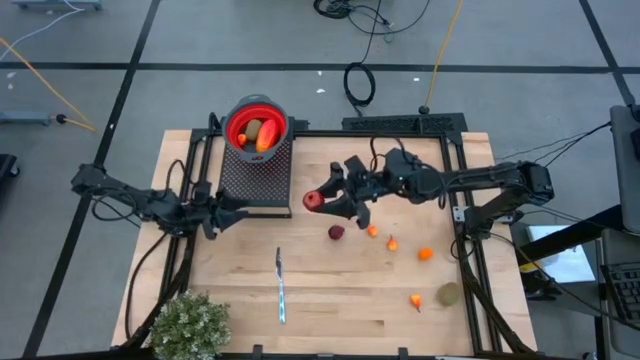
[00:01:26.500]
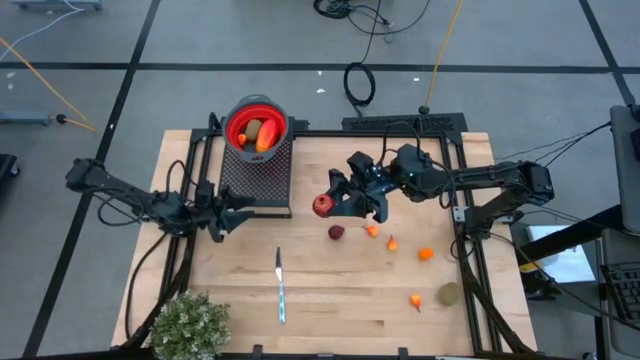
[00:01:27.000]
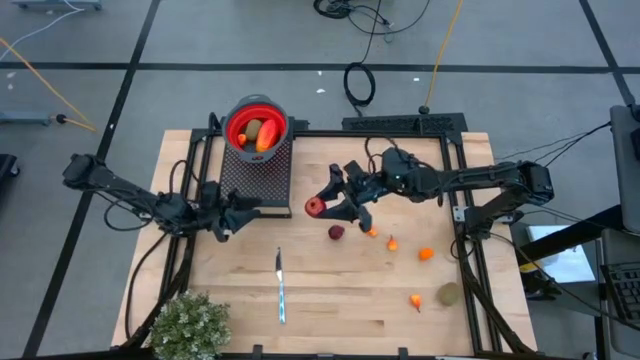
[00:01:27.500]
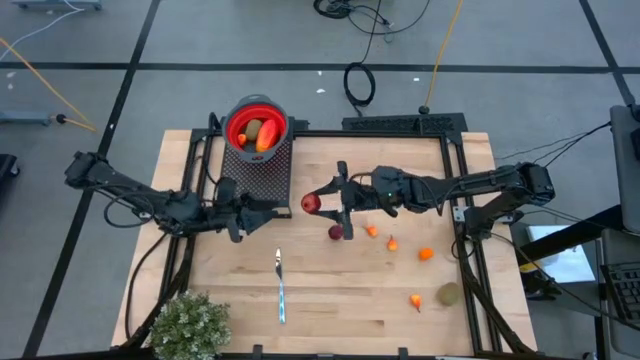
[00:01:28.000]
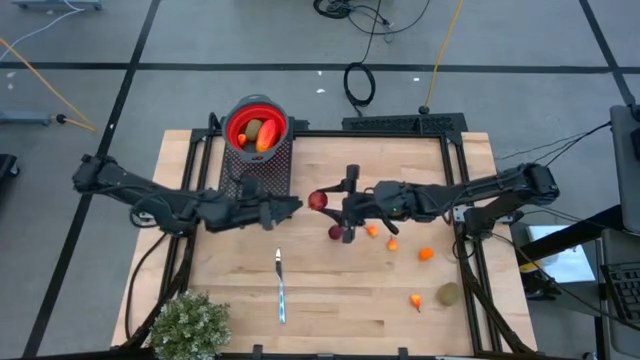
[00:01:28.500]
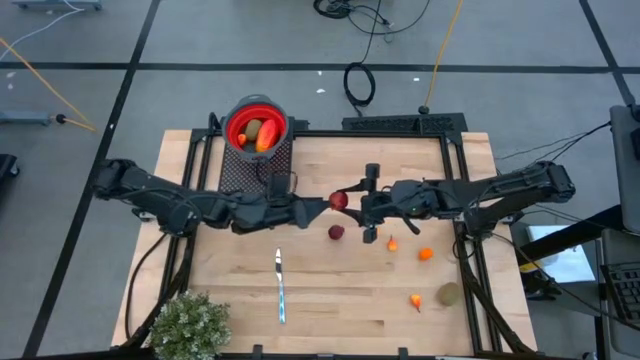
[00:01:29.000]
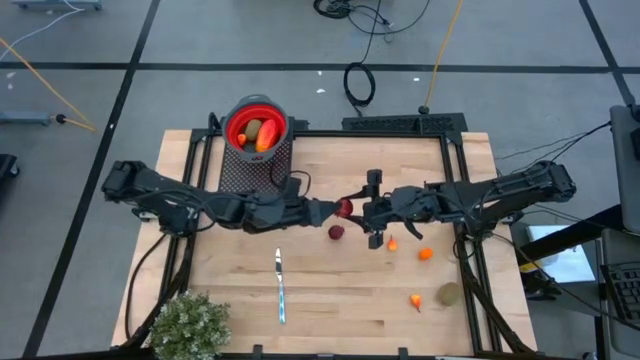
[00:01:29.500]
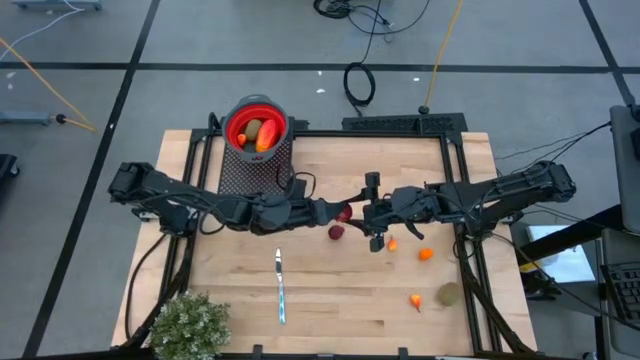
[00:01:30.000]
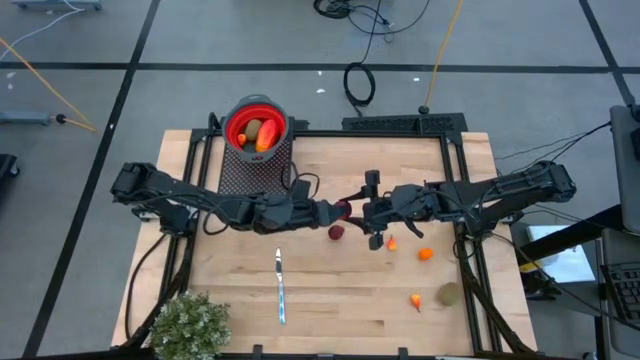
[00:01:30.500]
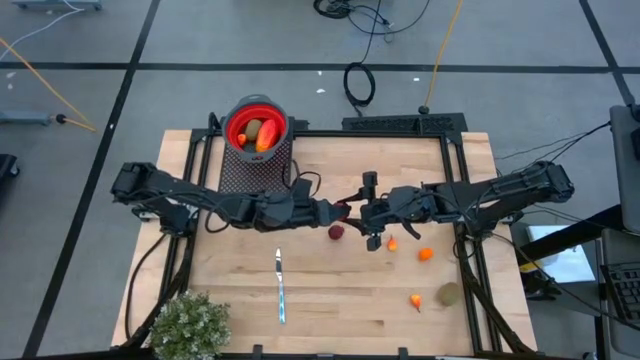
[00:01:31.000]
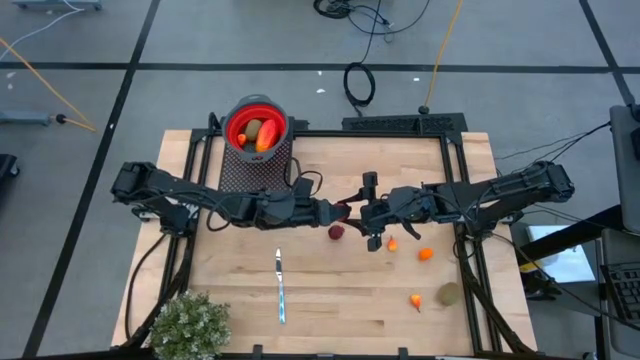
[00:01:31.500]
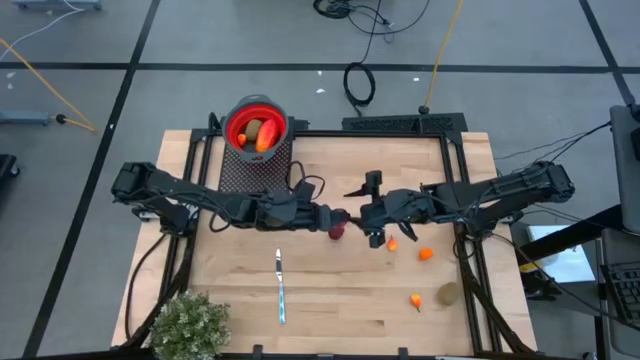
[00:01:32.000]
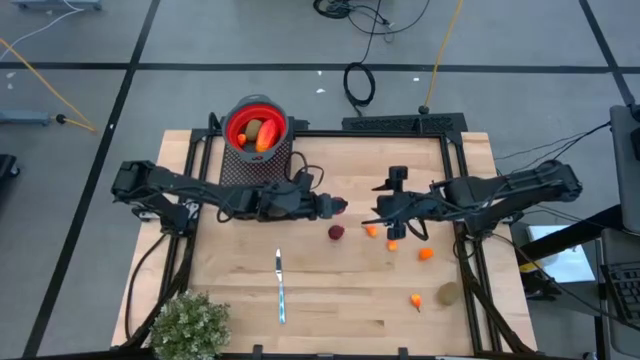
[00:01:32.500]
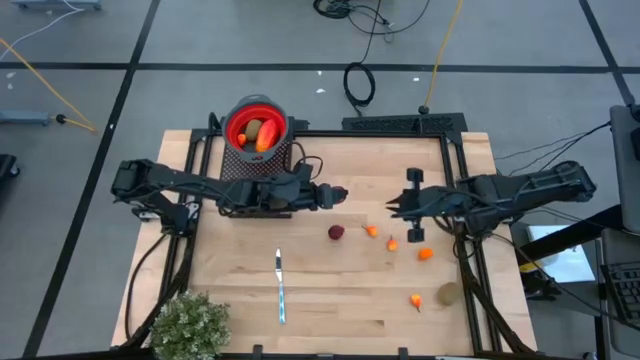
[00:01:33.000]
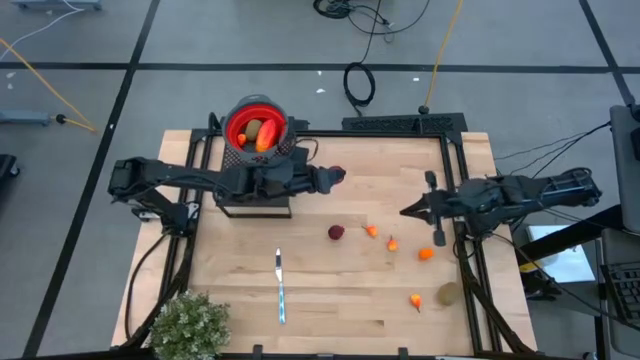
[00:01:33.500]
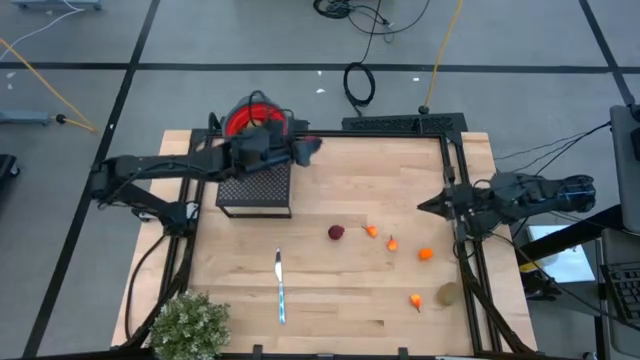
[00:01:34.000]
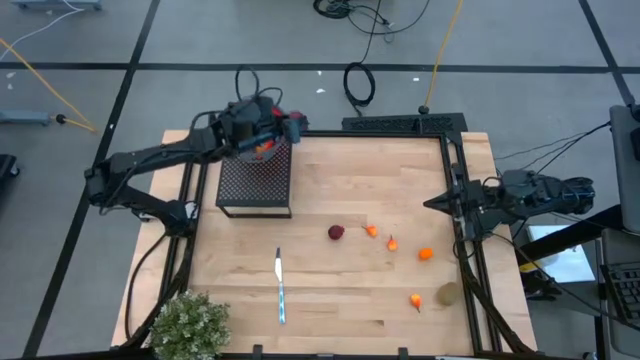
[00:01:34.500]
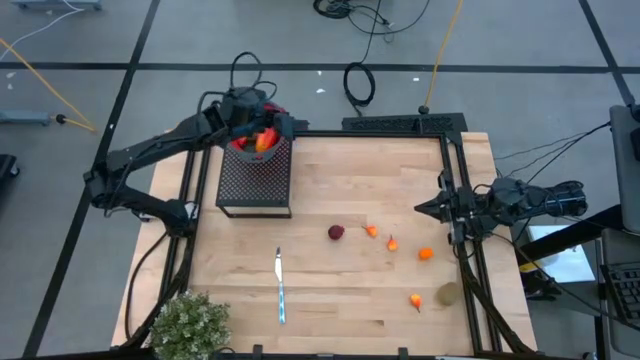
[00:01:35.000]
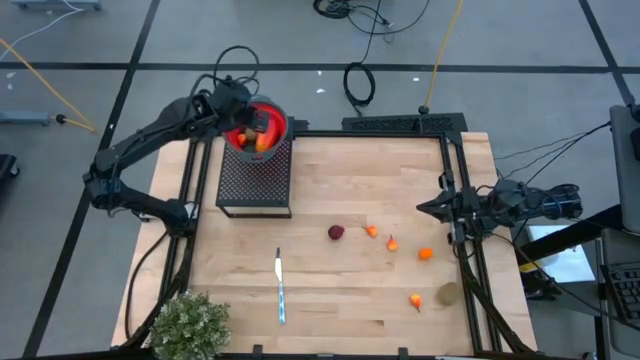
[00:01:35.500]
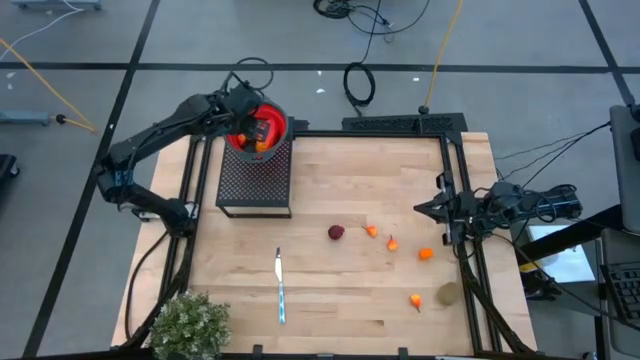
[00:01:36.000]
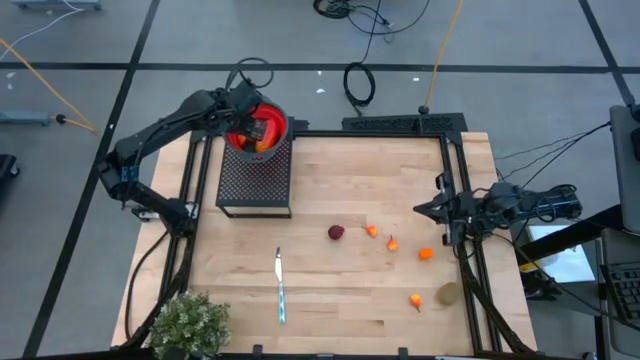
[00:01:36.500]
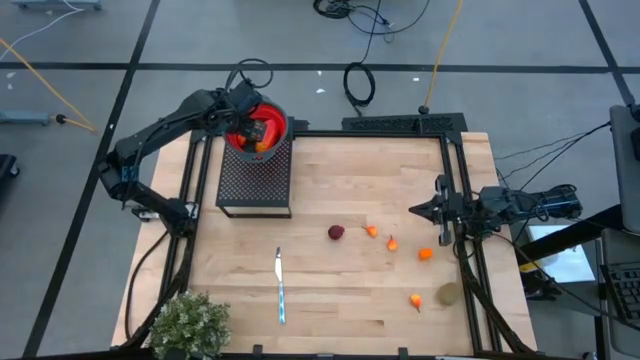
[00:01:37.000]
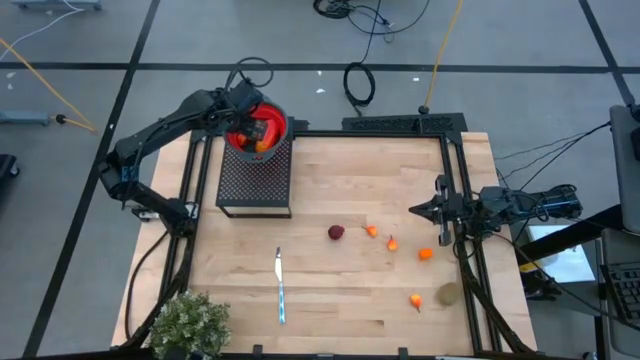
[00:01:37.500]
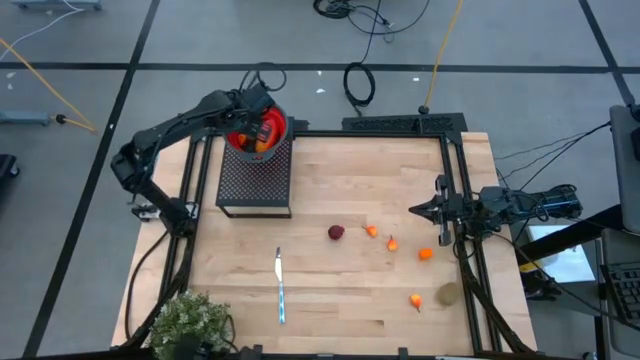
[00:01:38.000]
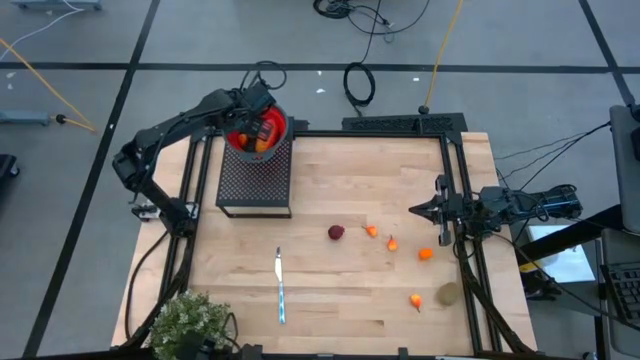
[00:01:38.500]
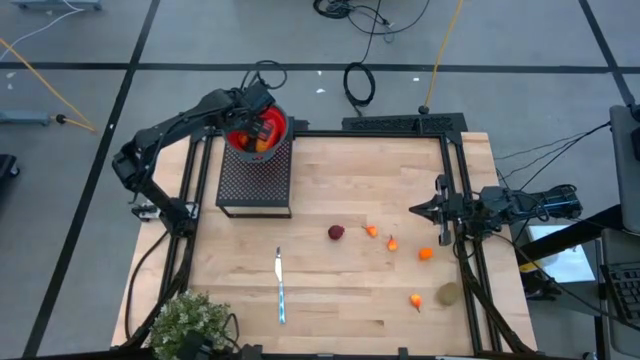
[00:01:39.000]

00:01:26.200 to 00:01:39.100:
Task: Pick & Place Fruit
Put the pomegranate into the red strainer bowl on the shelf

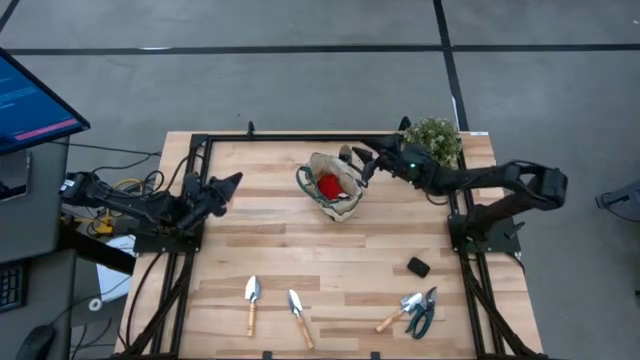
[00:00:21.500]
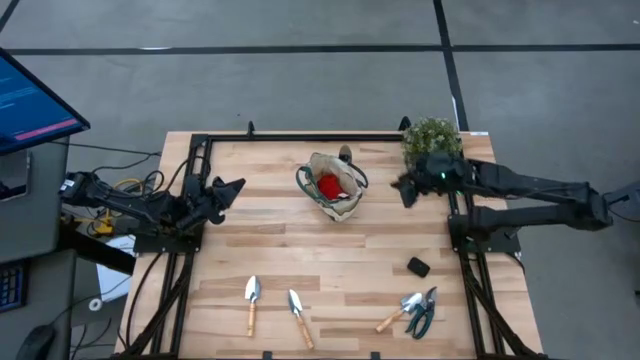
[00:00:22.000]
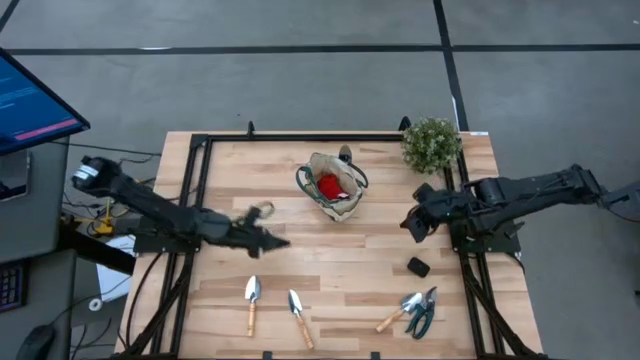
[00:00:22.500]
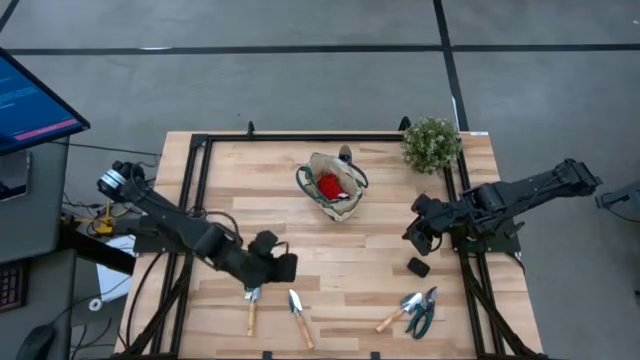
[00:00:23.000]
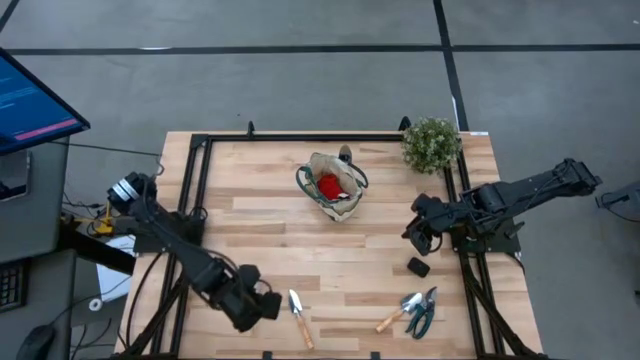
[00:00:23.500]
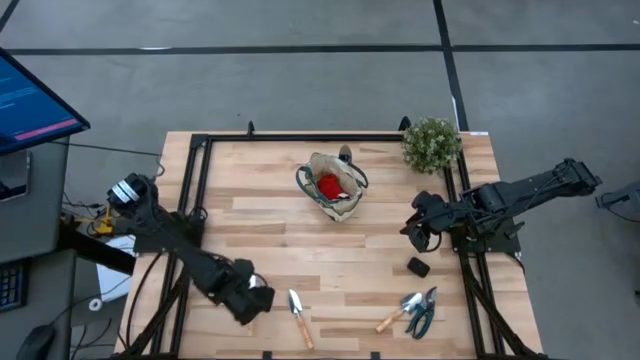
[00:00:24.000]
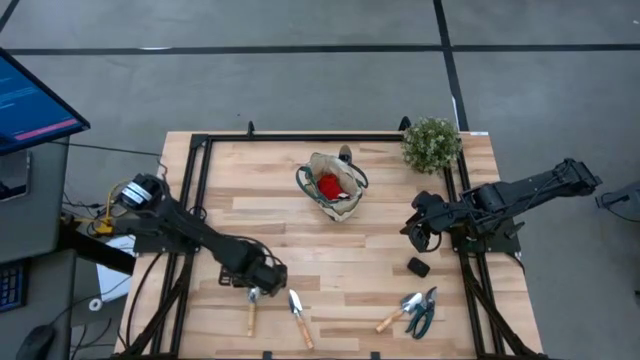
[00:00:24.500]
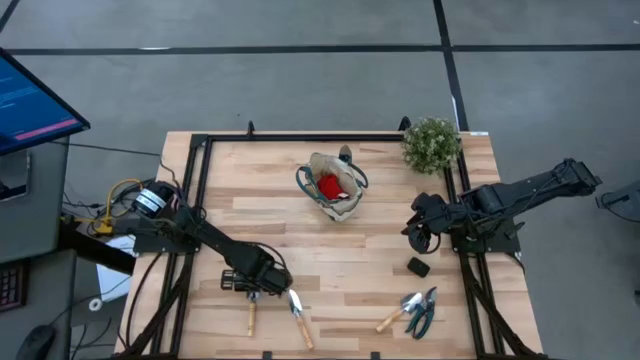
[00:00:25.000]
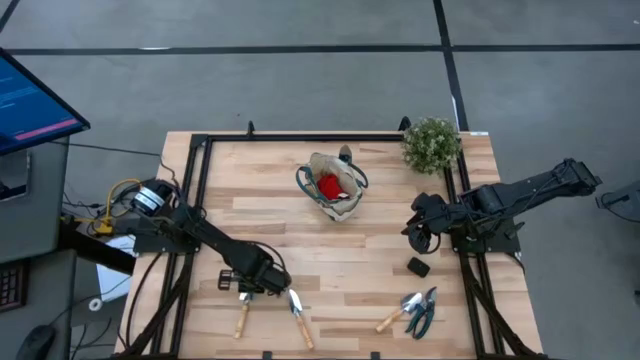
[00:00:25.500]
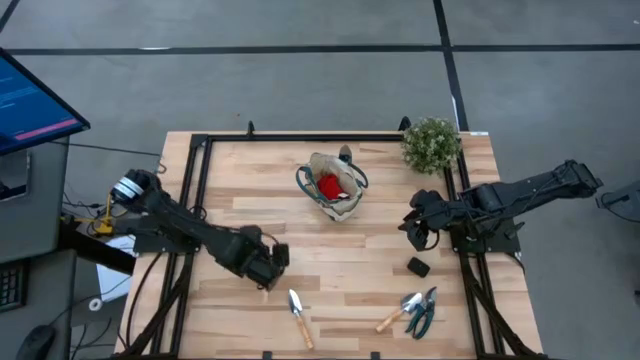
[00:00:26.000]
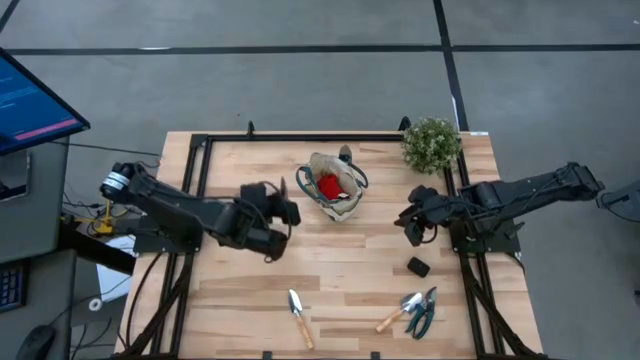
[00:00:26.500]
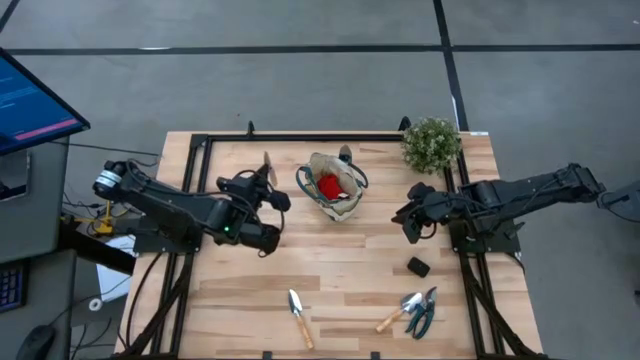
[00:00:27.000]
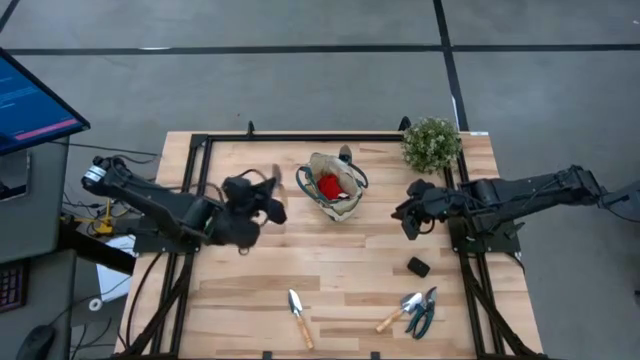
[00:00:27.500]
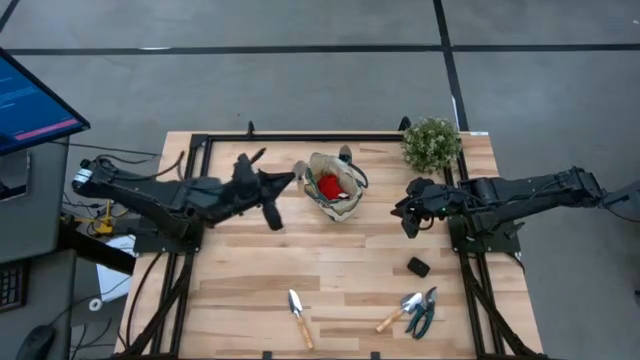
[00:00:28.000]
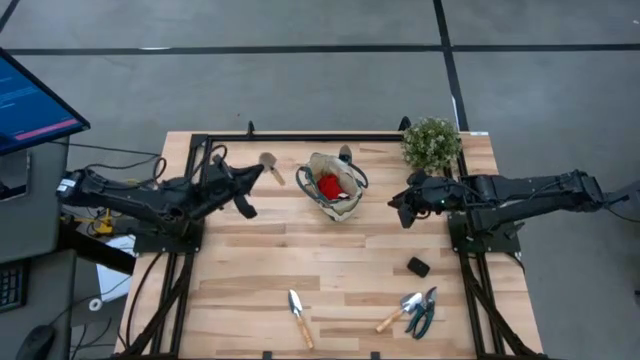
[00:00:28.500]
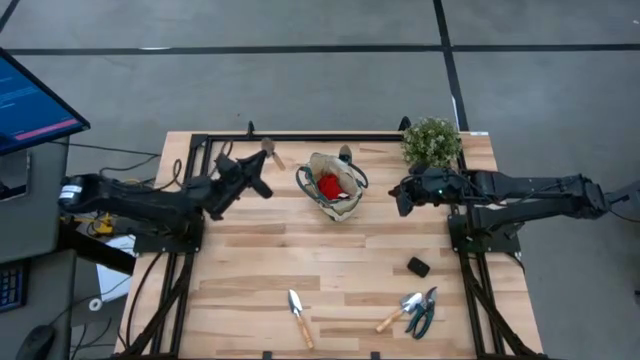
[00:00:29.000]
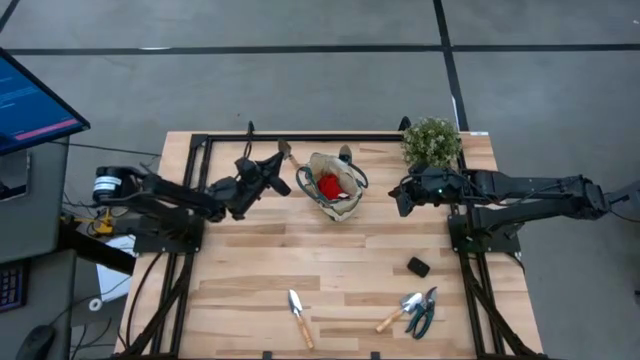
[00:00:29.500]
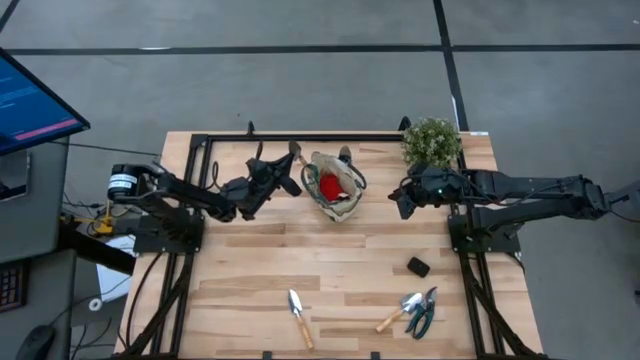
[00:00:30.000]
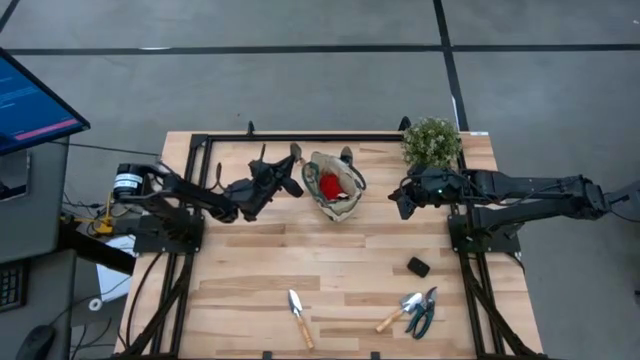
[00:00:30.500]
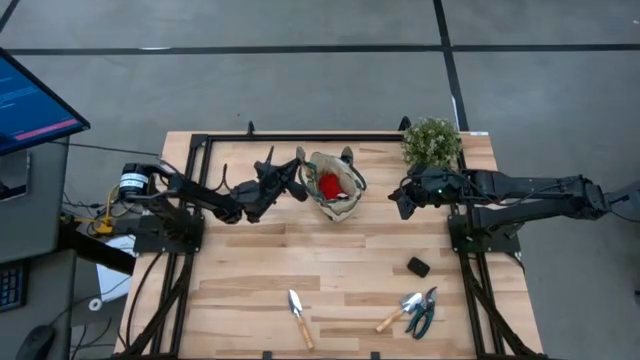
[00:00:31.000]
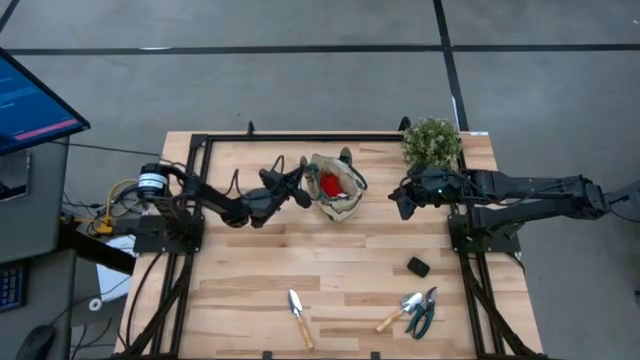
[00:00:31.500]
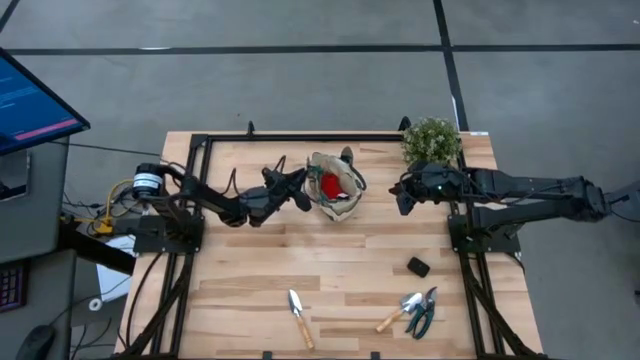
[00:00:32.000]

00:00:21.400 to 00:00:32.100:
Task: Pick & Place Garden tools in Gardening bag
Put the brown trowel into the green gardening bag
